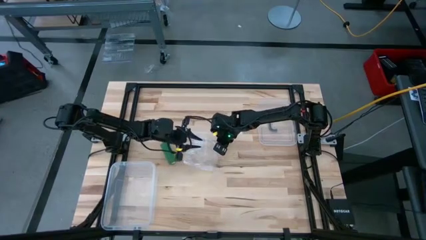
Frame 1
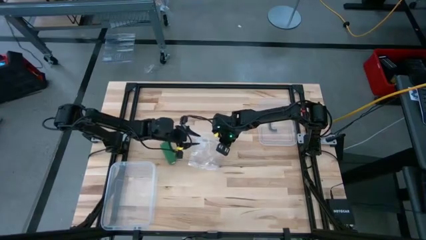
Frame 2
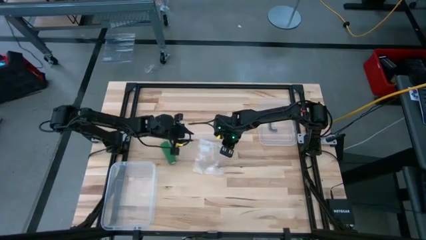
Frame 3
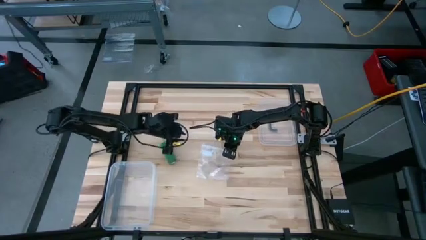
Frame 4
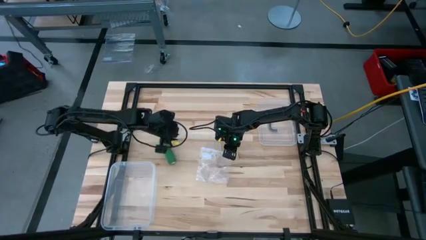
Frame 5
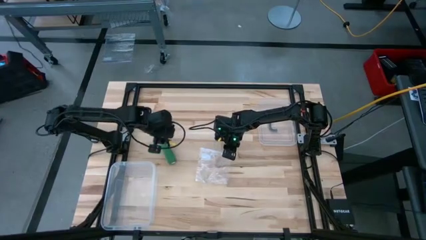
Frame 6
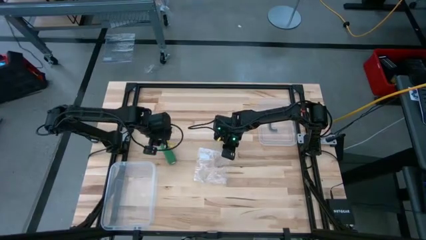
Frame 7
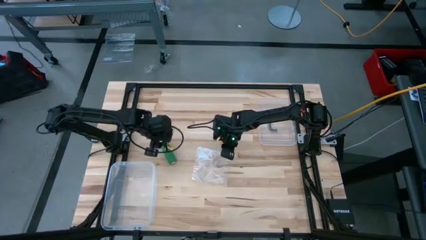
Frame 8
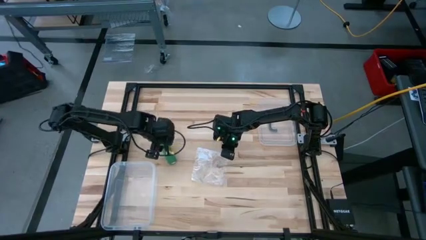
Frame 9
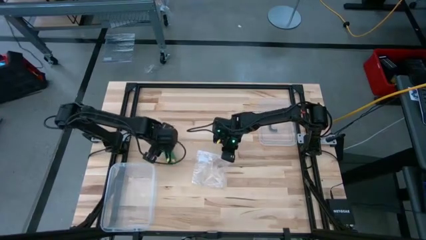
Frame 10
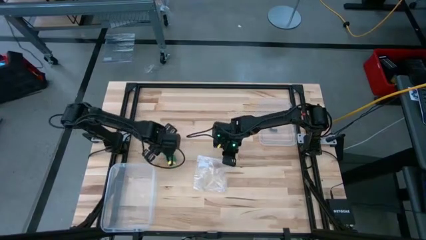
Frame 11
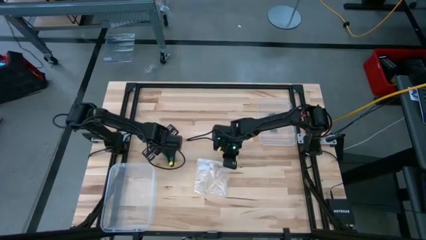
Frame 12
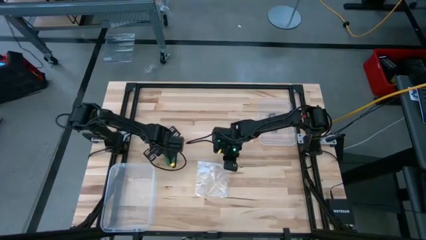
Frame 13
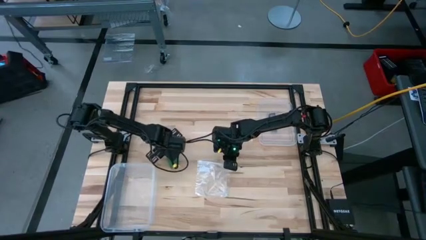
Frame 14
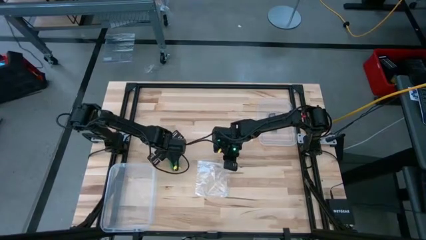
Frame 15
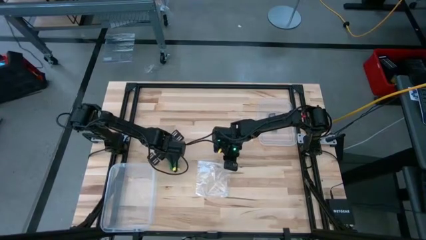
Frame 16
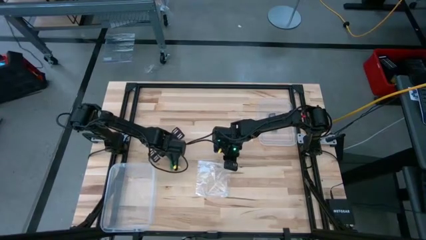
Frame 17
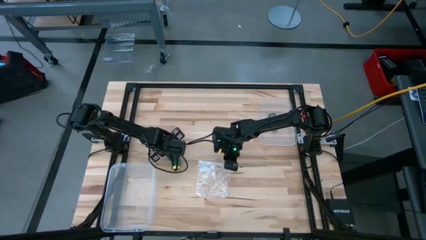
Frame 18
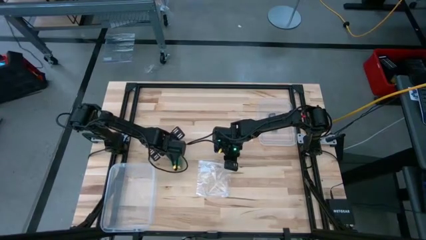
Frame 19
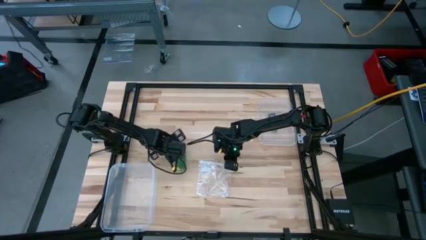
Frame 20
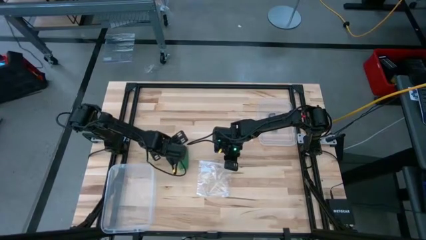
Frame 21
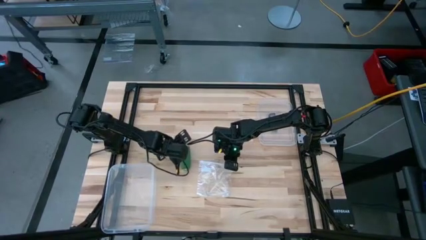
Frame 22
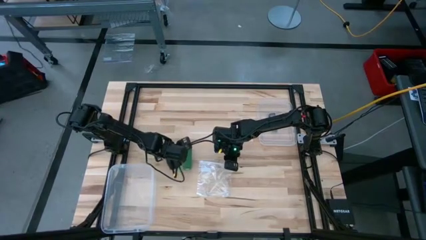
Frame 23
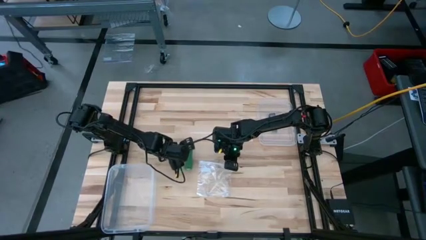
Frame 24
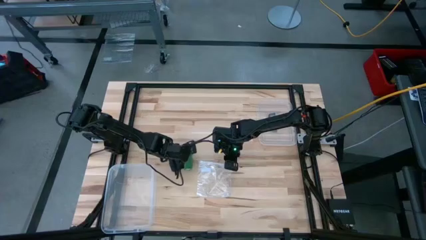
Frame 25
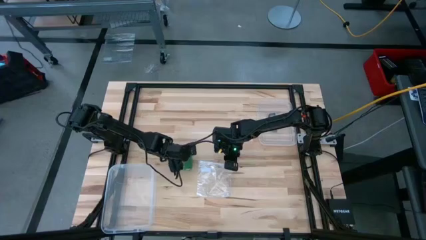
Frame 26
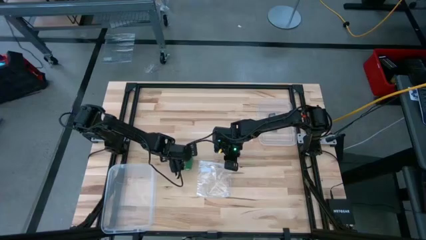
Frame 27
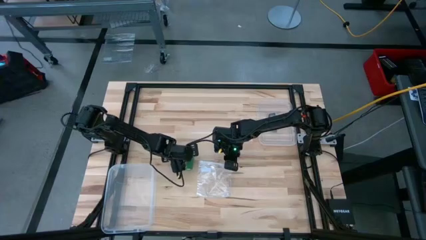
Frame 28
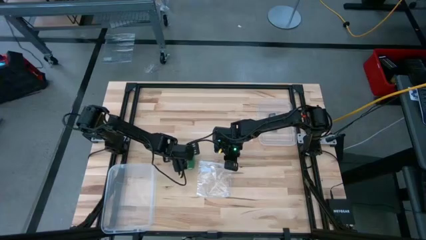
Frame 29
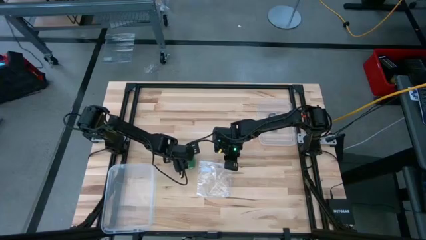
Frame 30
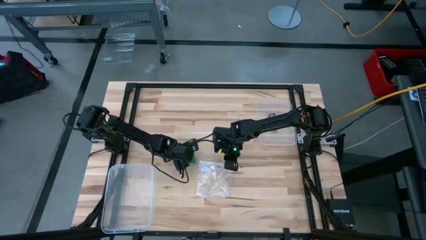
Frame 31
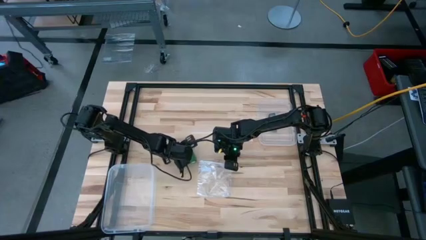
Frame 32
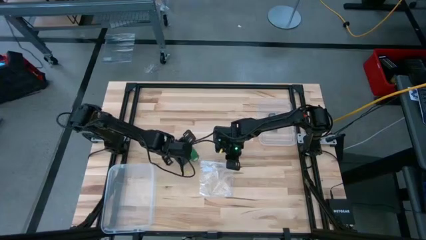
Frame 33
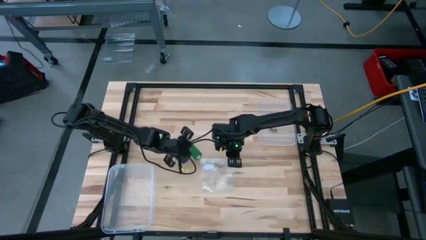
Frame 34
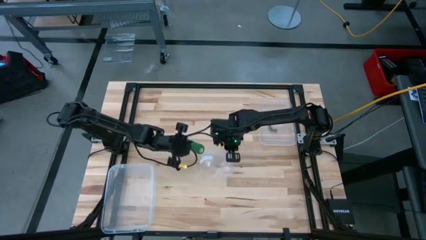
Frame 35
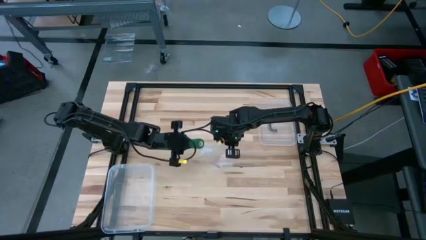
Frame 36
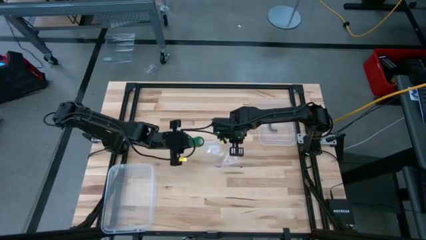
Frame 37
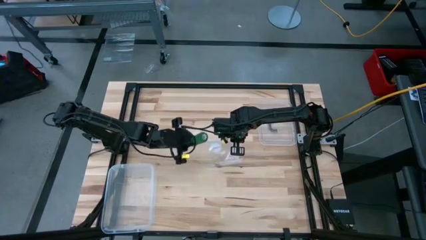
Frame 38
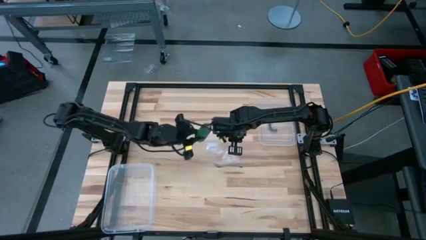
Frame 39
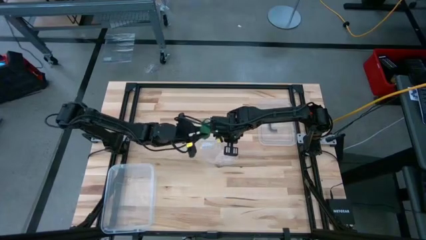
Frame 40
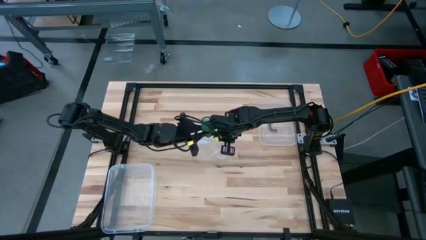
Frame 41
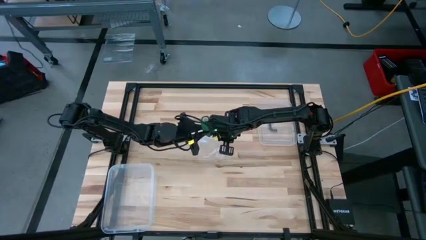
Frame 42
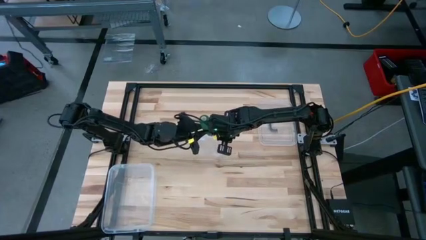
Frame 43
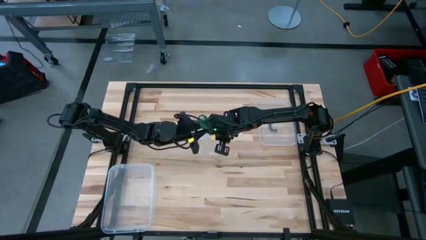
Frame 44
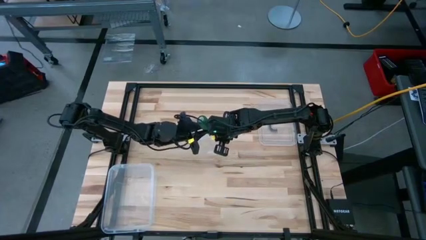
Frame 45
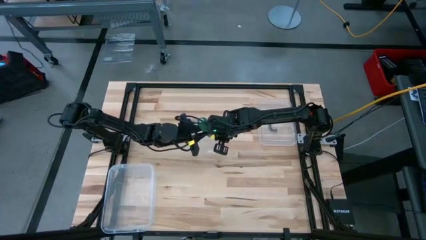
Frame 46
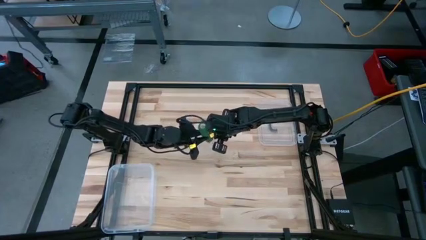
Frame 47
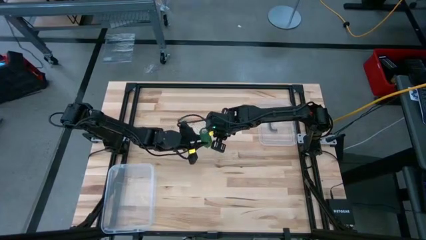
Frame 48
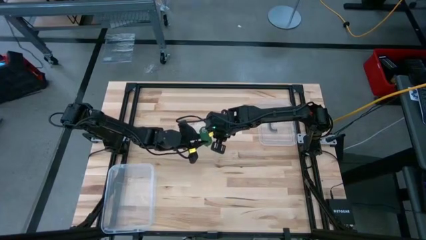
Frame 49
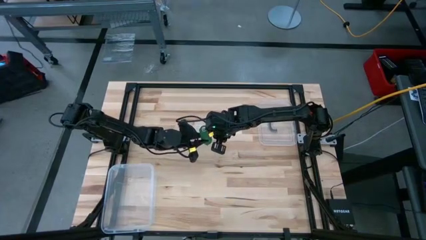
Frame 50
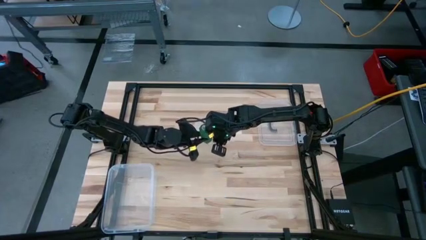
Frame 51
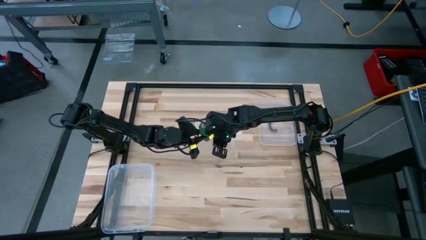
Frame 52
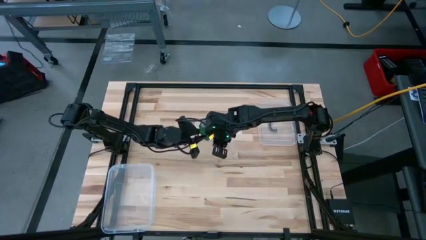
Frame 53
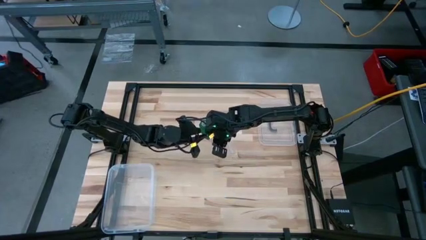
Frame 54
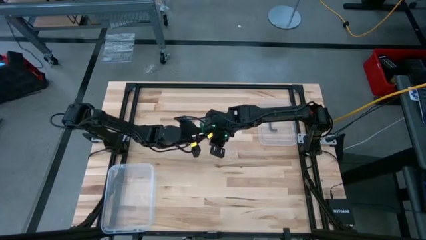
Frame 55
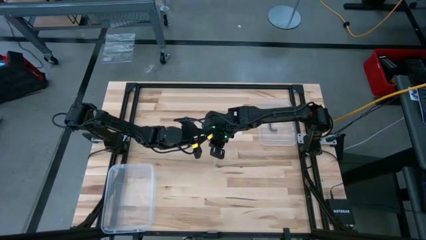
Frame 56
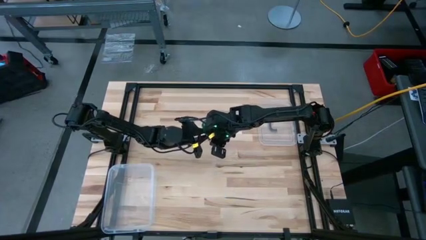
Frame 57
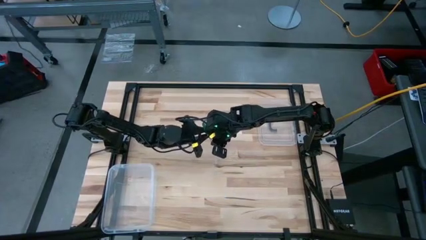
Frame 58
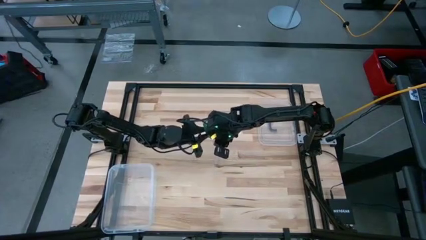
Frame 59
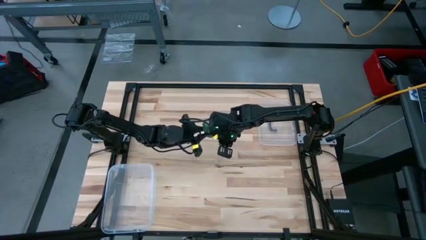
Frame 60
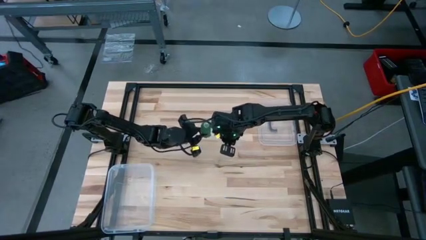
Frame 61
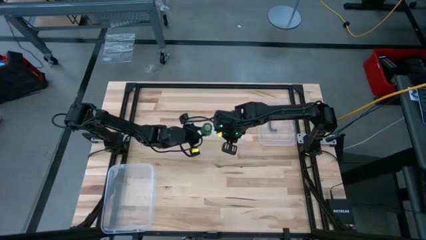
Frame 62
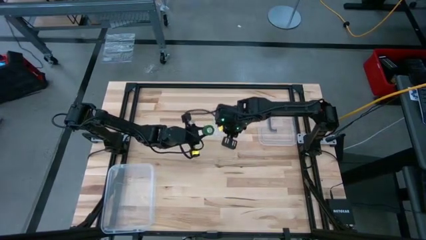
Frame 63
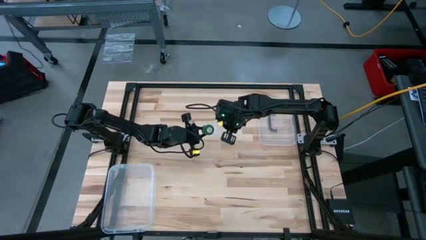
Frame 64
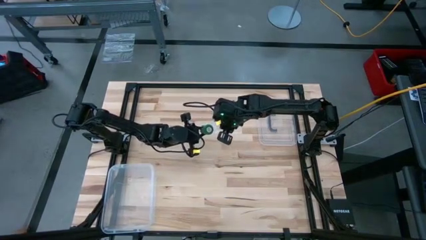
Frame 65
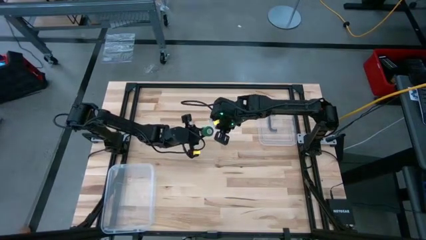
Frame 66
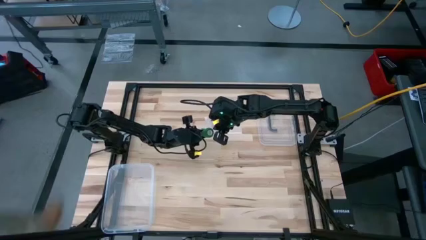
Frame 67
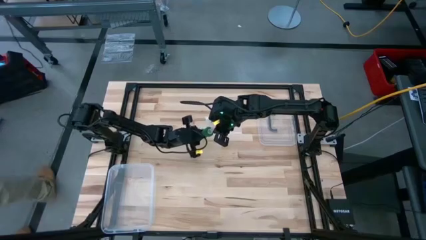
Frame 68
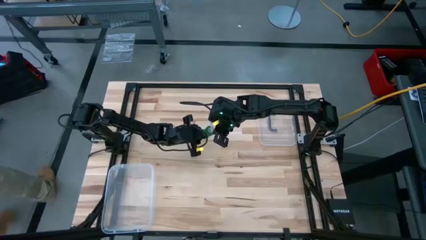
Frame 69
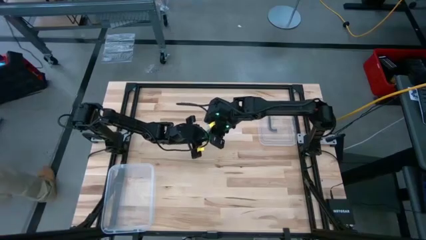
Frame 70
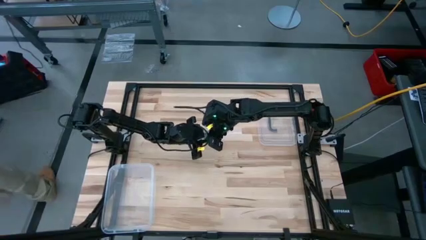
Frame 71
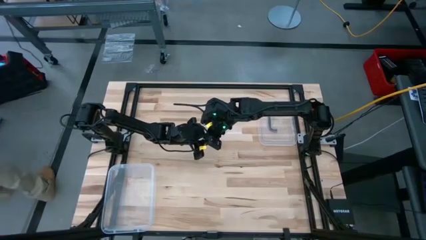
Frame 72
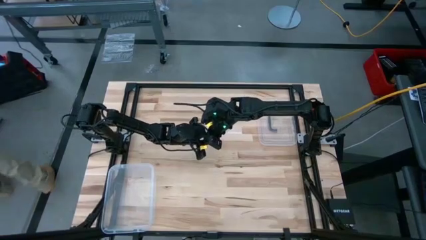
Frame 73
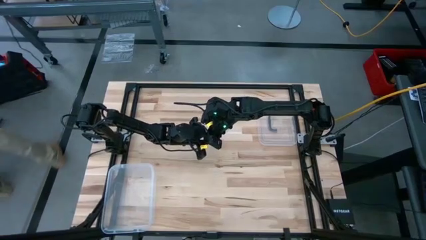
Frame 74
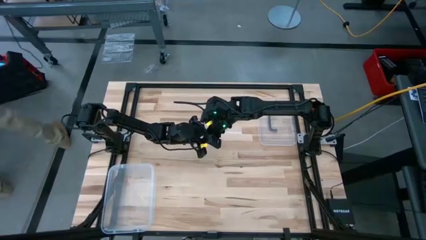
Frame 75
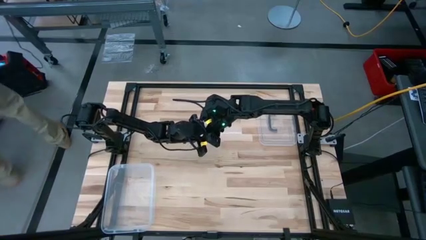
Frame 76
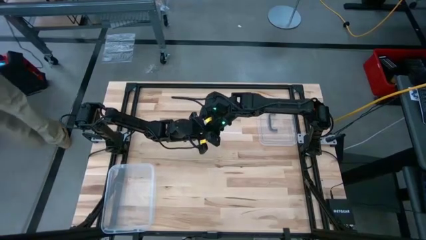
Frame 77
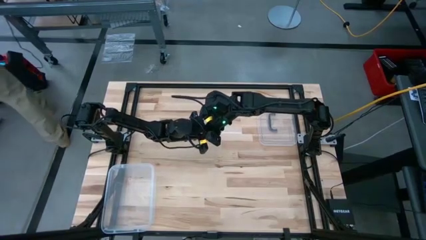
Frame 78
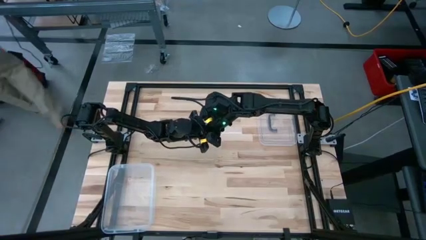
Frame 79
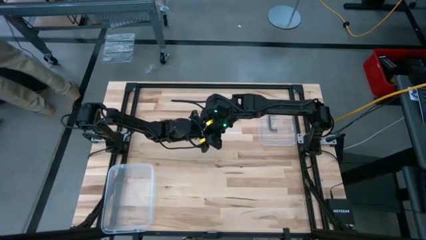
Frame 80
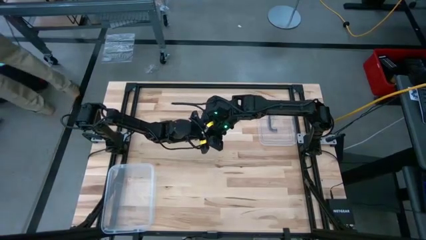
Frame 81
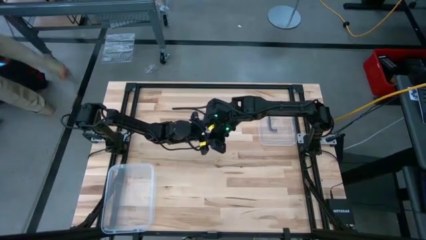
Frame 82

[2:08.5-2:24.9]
Task: Roll bandage
Put the bandage into the zip bag
